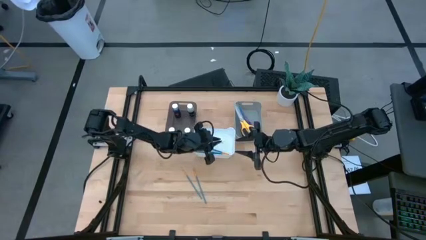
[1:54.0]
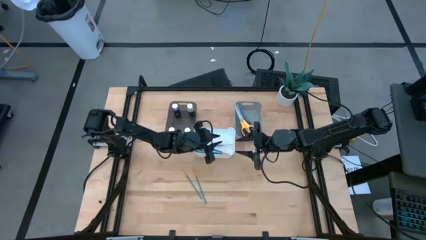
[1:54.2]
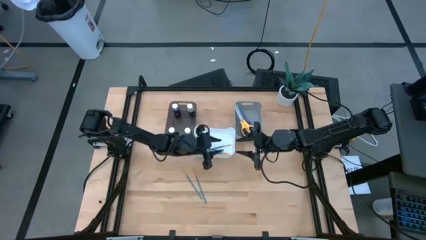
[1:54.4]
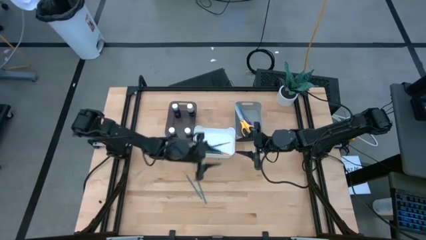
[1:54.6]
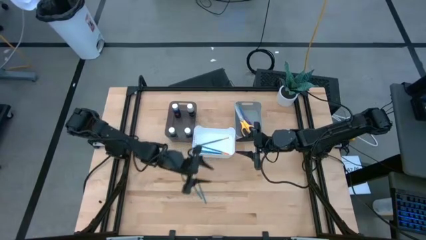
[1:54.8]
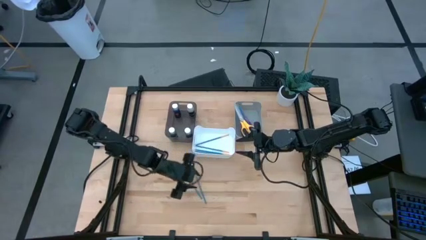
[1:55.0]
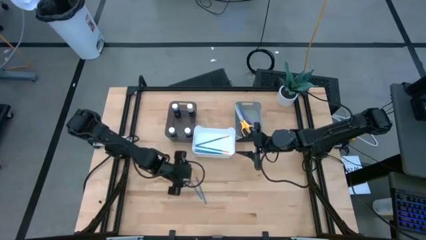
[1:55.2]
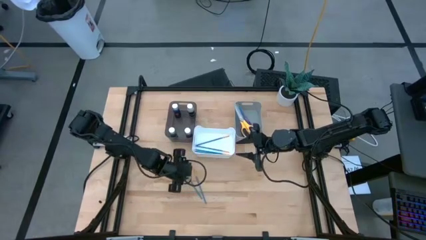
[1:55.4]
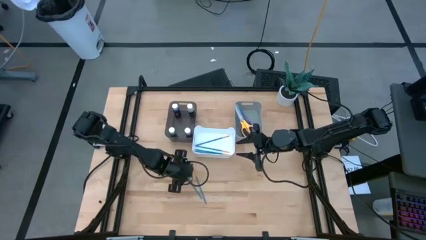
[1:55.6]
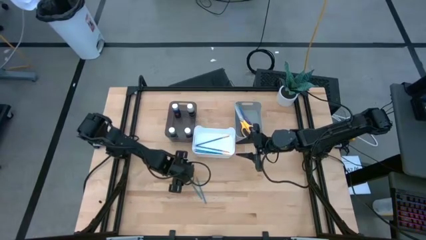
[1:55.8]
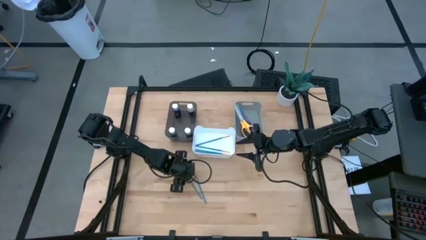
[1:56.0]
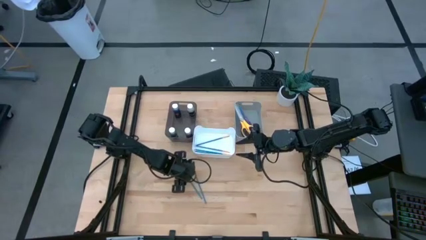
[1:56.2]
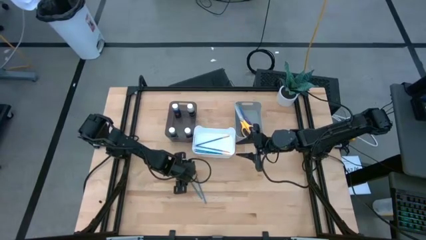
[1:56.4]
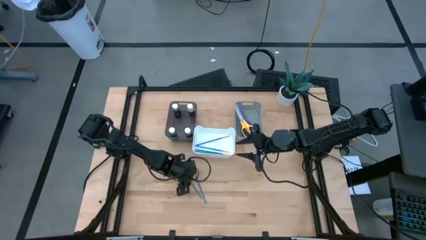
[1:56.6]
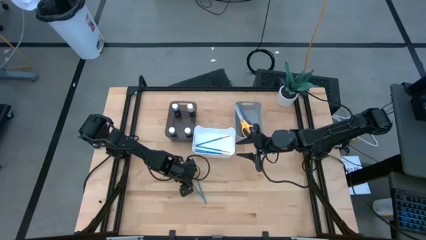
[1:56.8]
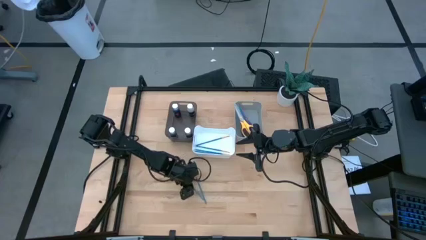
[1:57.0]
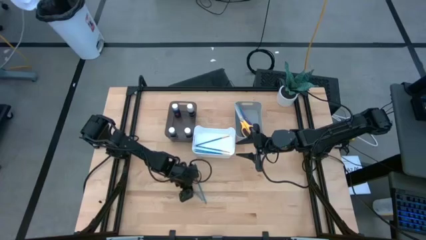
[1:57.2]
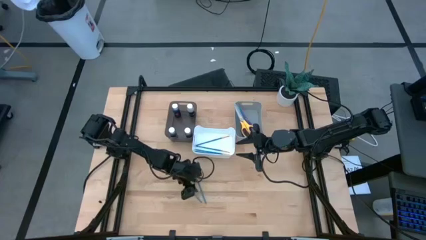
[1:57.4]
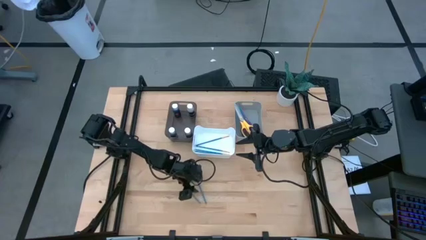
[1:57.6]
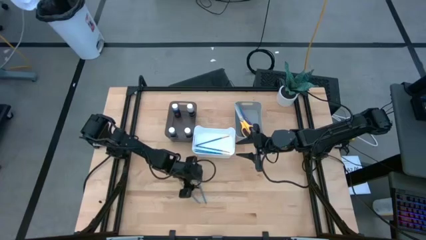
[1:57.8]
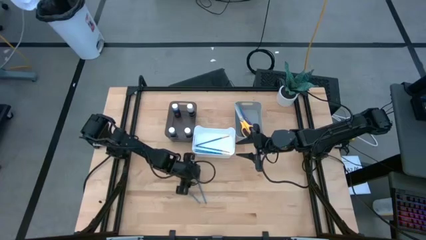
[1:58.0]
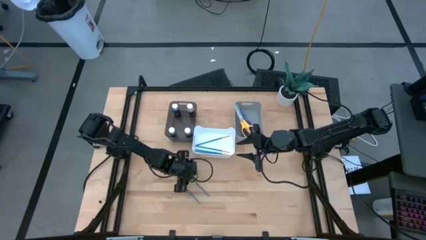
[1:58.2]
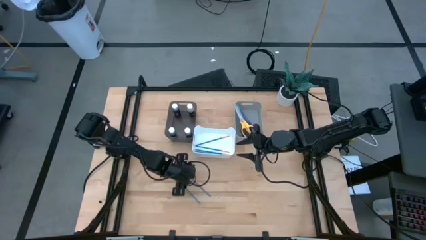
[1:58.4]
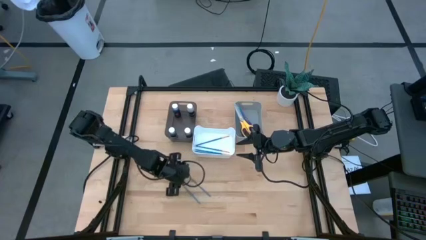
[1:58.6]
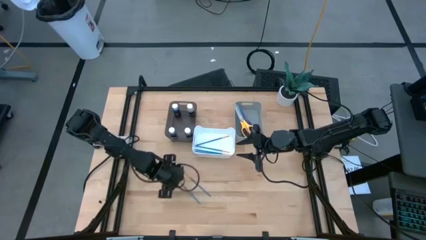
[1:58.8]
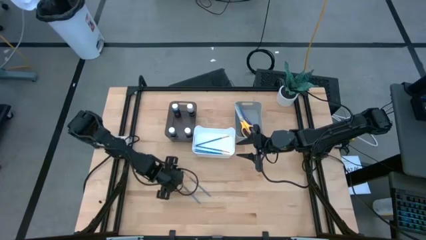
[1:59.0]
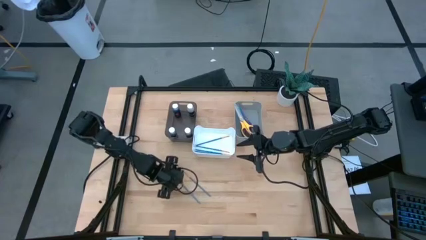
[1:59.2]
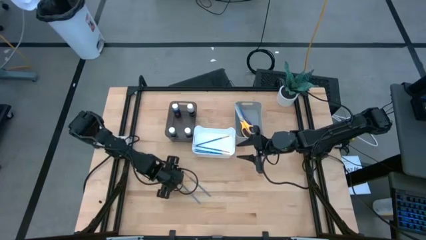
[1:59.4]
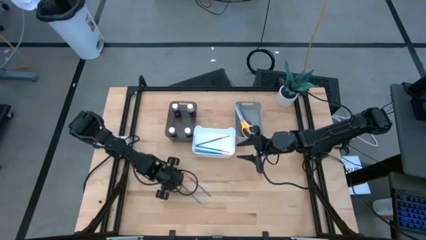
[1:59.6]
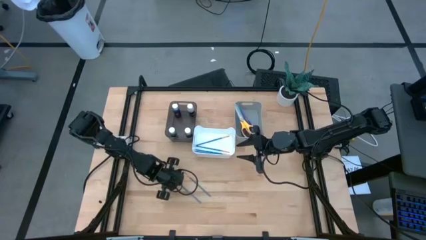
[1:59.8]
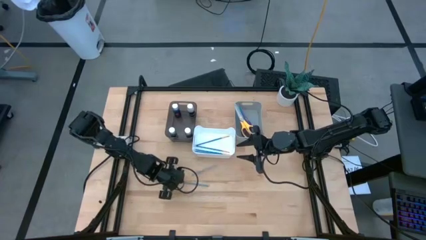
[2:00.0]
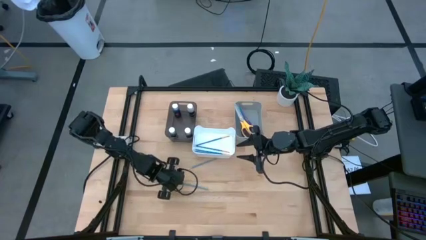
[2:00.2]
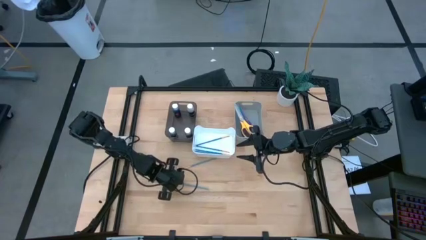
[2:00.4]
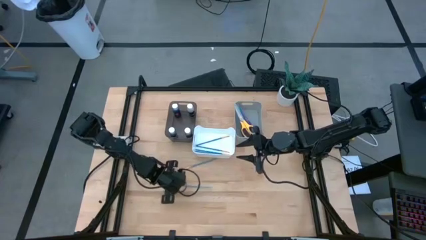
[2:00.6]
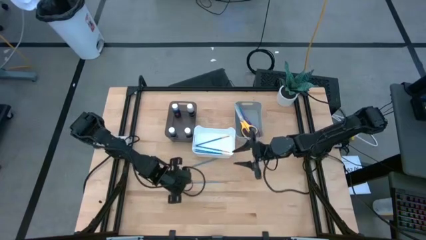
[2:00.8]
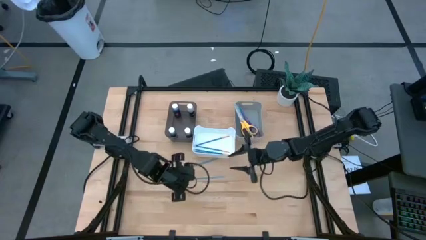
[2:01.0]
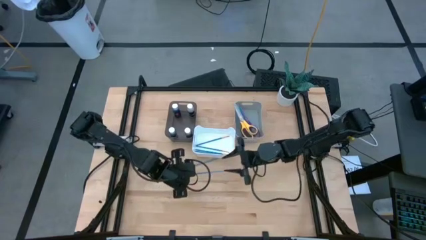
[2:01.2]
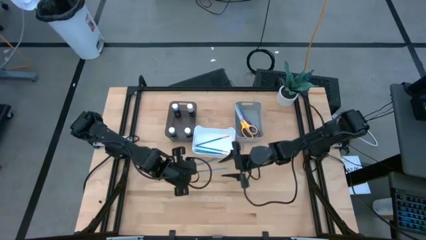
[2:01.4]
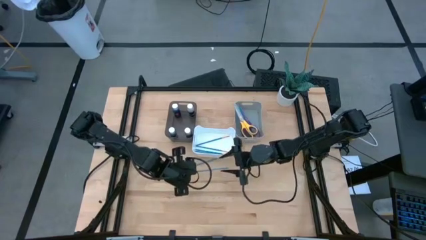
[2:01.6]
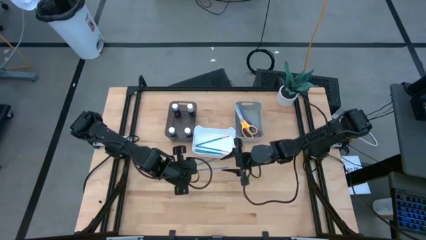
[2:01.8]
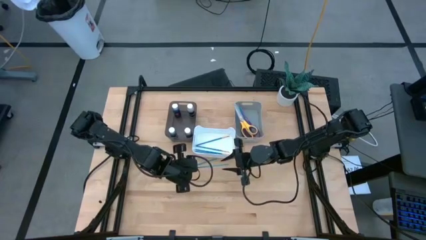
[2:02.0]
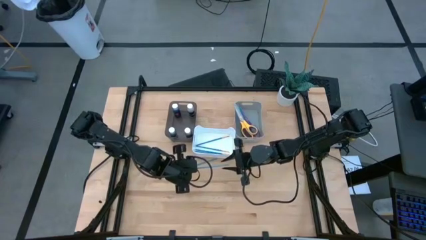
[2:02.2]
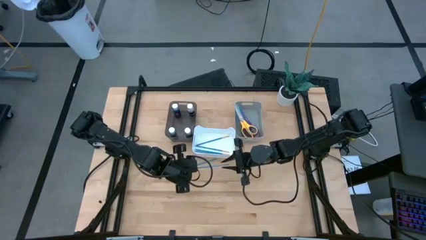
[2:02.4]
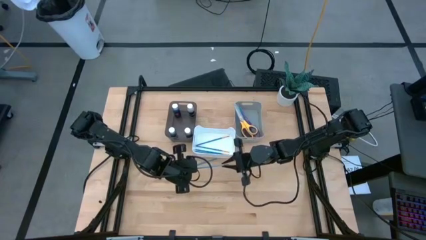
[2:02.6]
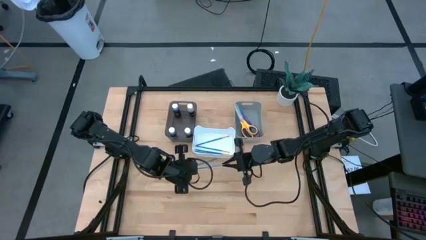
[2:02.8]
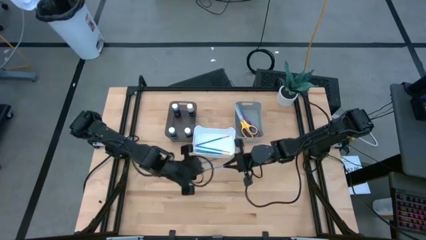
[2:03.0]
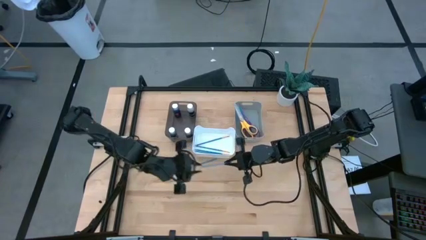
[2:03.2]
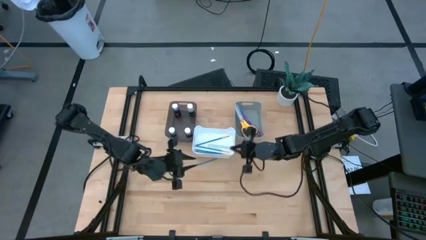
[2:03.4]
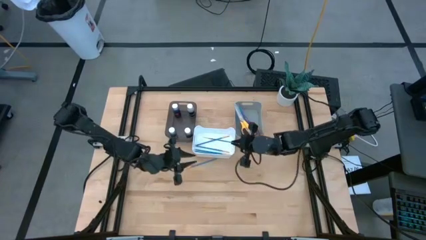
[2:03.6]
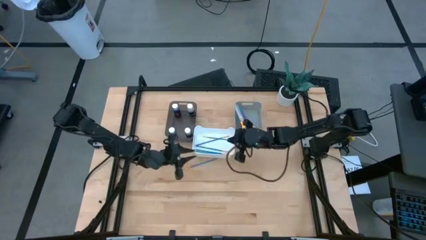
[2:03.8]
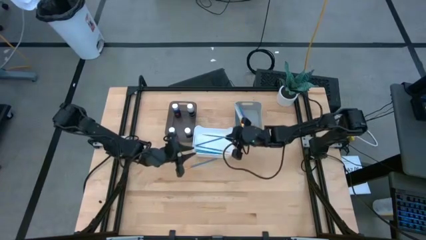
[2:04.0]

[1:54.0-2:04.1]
Task: Pick & Place Paint Supplies
Put the blue paint brush into the white bin
